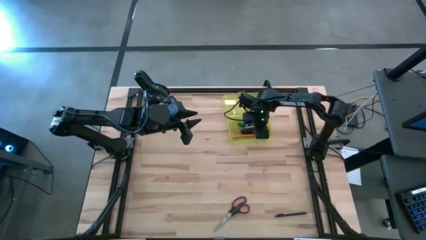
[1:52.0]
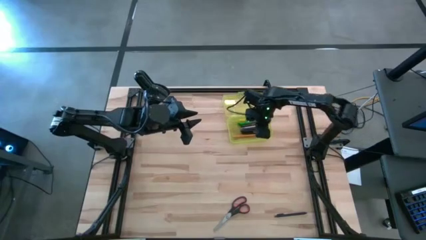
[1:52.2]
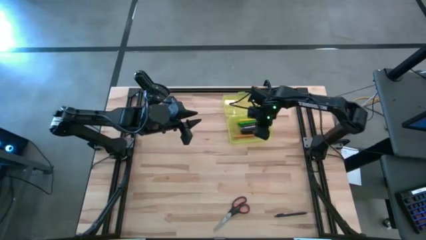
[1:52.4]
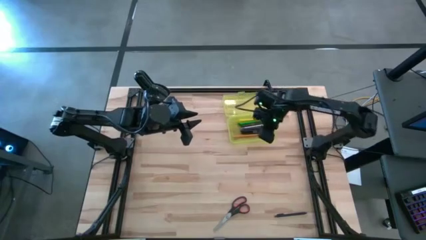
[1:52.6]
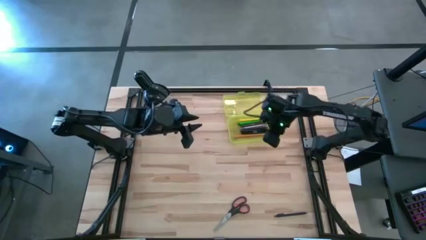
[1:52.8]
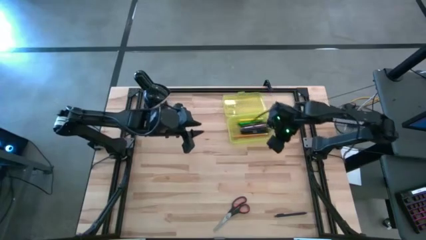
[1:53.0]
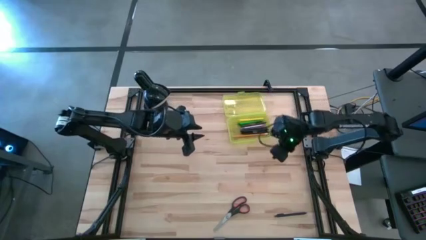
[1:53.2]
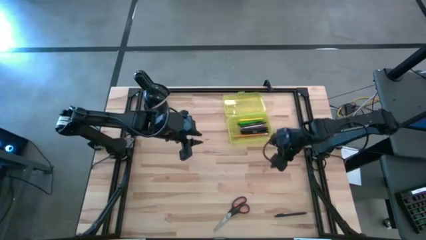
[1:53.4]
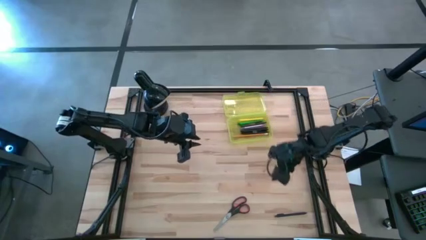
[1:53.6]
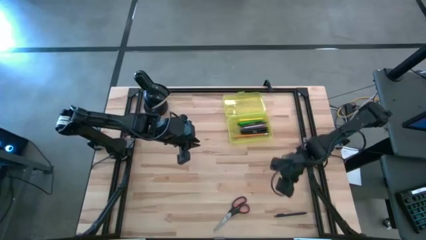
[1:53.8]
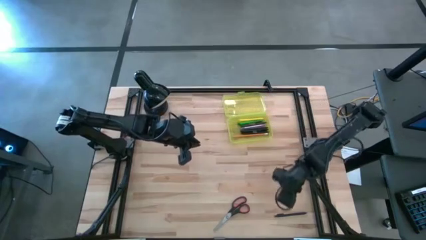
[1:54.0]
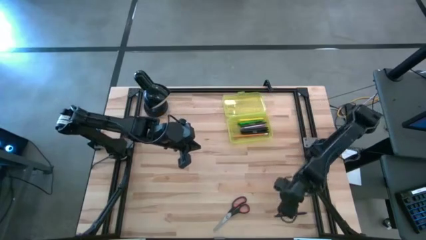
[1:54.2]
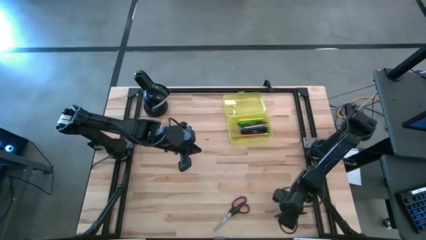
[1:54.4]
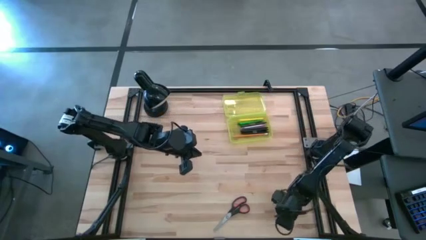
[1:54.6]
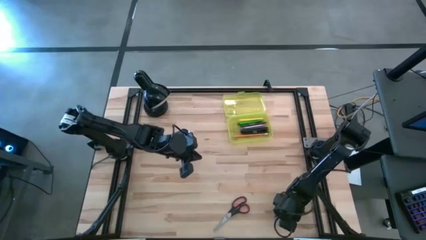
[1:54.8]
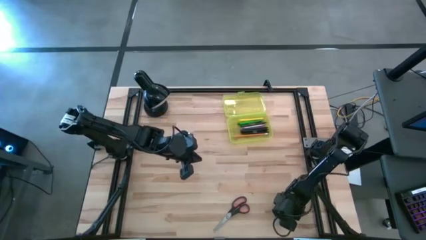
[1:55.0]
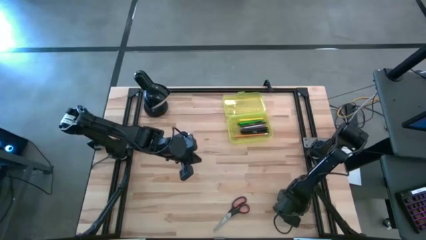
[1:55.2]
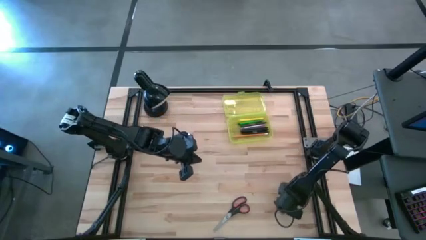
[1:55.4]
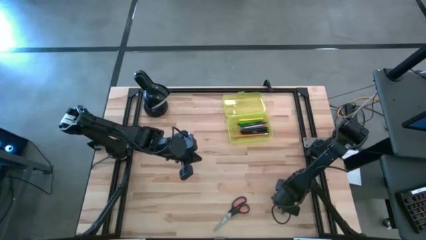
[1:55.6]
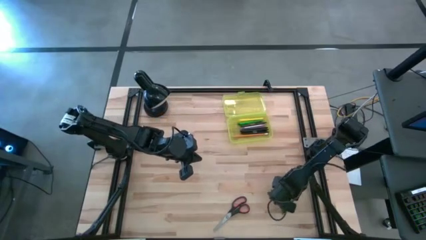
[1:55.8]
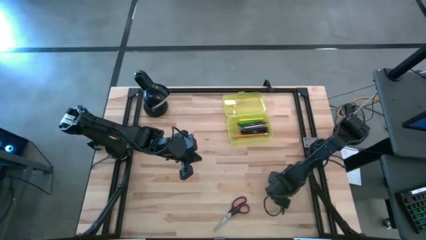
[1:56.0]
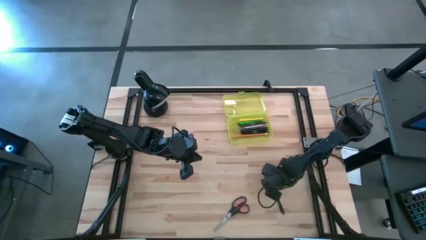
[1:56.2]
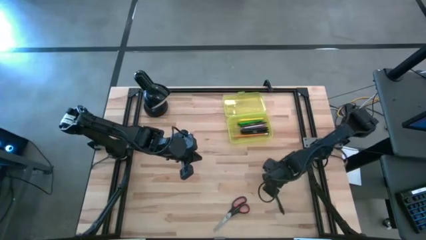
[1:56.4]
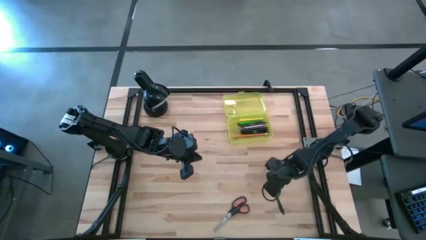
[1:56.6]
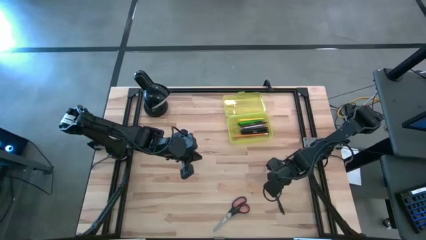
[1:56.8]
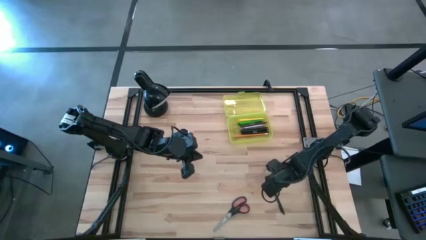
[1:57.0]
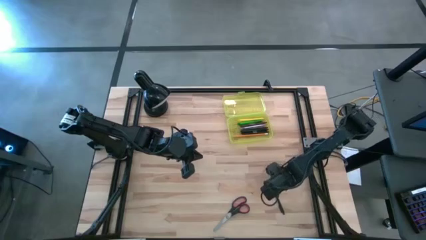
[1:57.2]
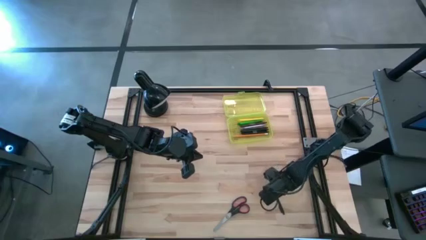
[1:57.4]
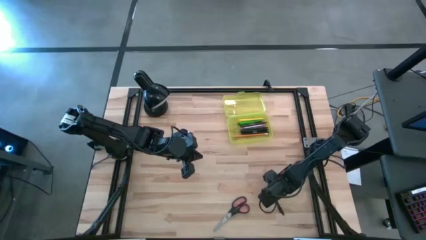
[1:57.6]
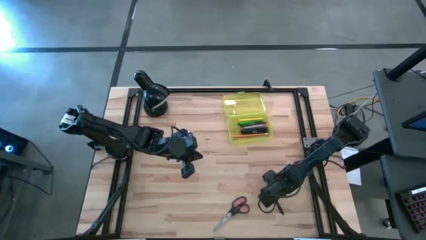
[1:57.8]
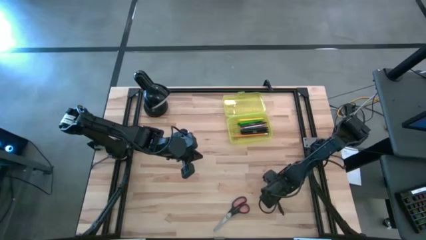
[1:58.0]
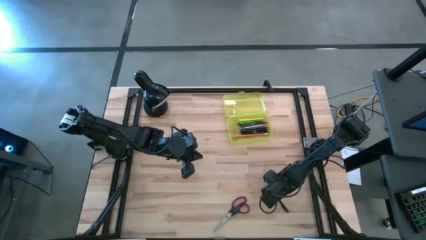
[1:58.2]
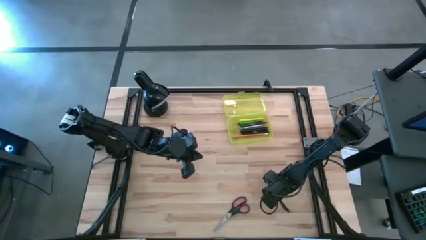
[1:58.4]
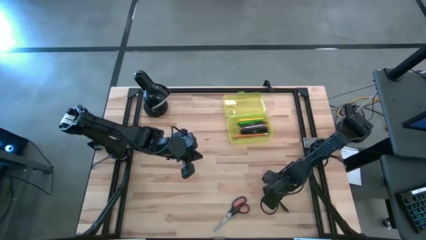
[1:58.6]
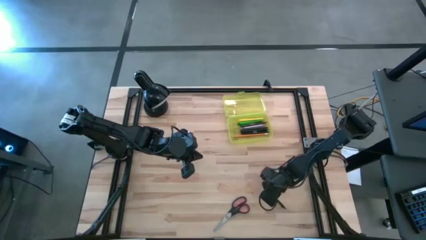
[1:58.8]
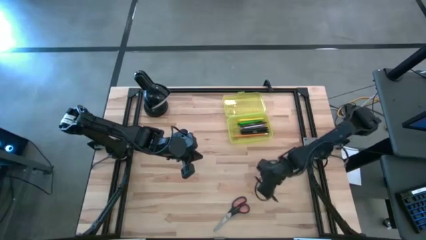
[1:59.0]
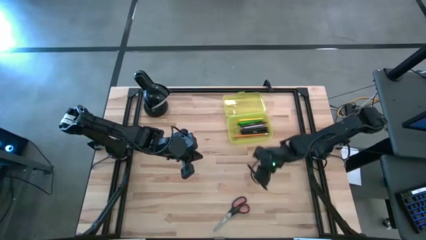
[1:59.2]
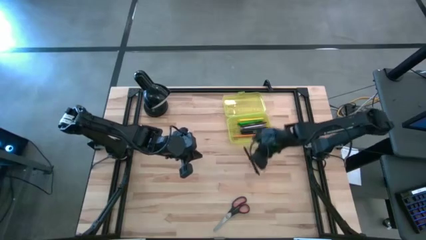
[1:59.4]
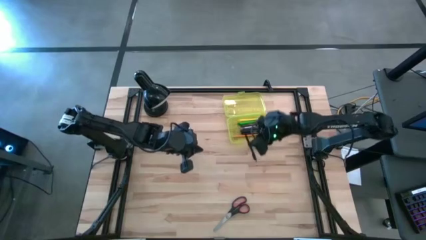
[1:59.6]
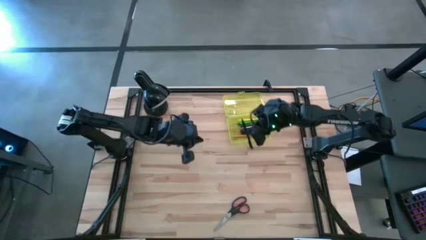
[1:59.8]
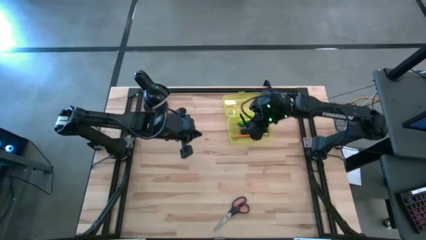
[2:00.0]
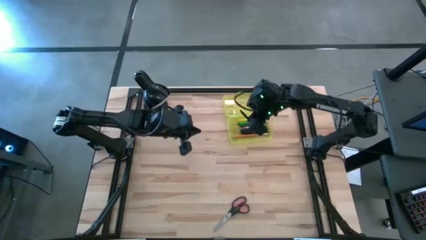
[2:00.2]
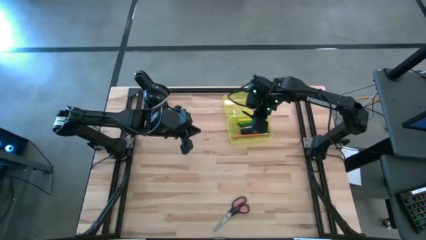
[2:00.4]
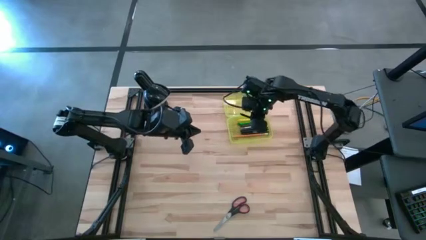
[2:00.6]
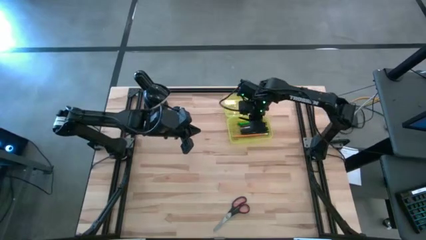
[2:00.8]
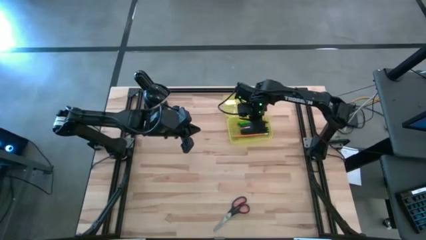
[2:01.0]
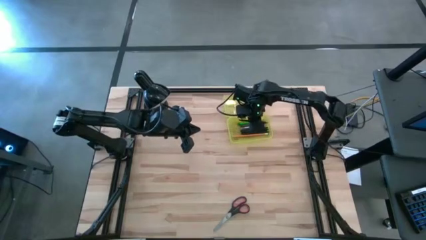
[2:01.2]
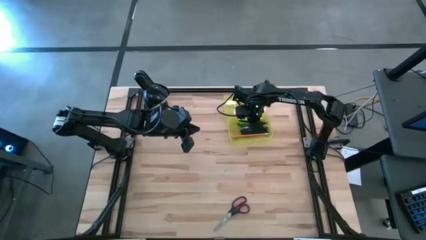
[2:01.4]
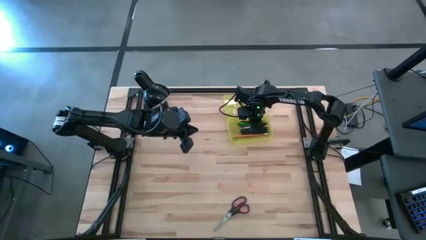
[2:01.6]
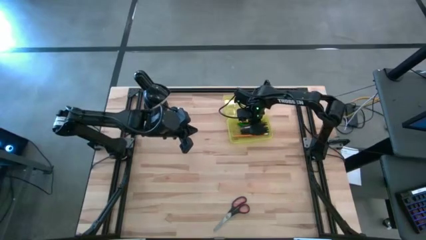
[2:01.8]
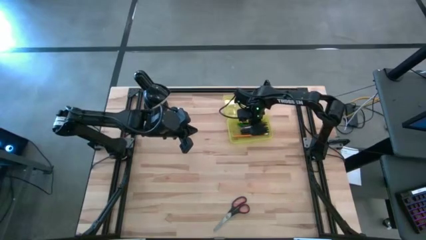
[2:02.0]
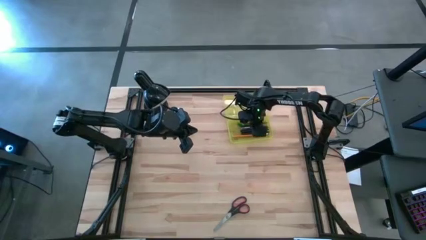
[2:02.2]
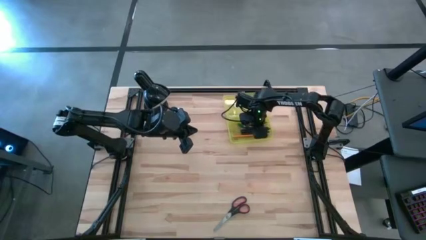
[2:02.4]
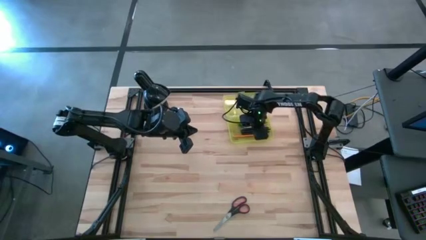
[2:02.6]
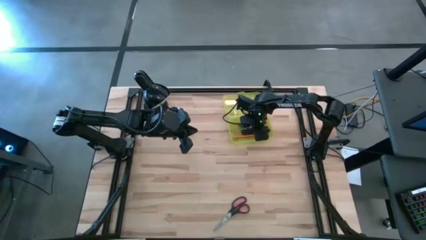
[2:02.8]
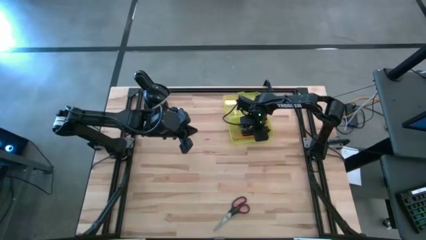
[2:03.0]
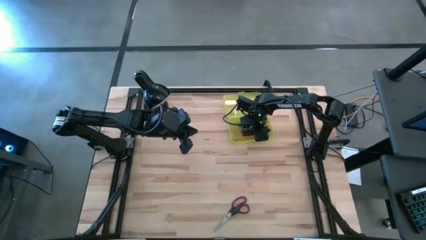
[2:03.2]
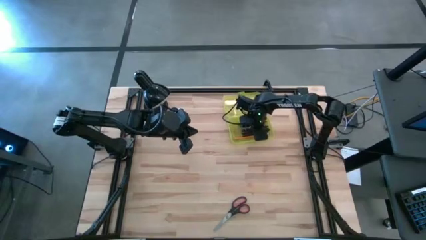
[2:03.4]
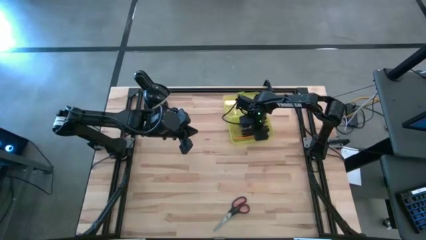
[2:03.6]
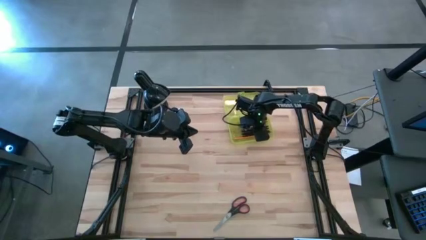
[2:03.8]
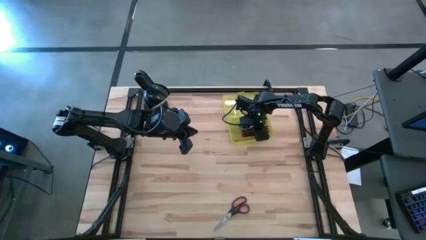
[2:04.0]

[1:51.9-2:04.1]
Task: Pick & place school supplies into a supply box
Put the black pen into the supply box

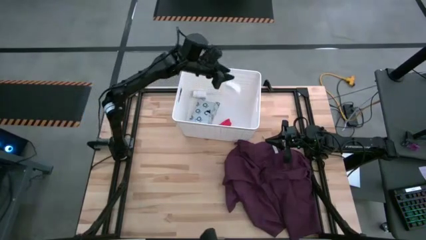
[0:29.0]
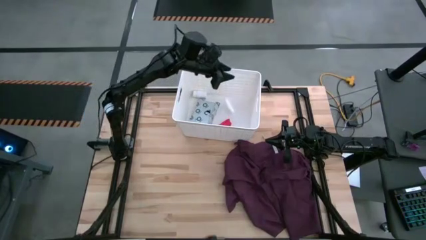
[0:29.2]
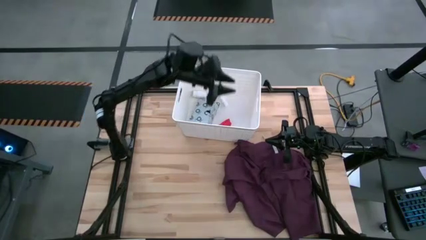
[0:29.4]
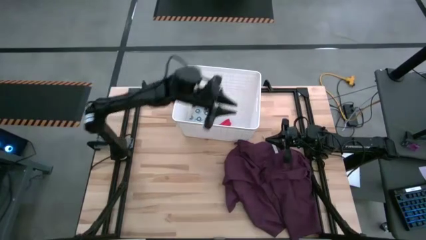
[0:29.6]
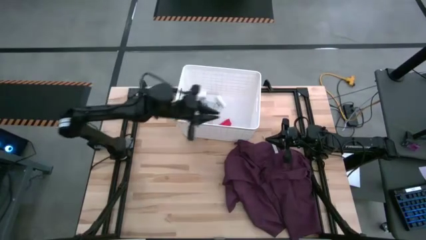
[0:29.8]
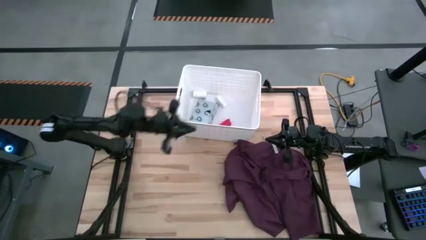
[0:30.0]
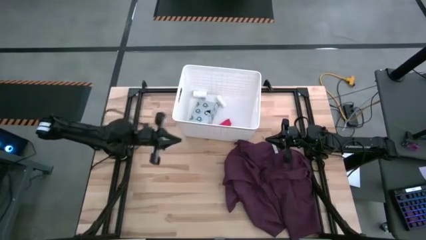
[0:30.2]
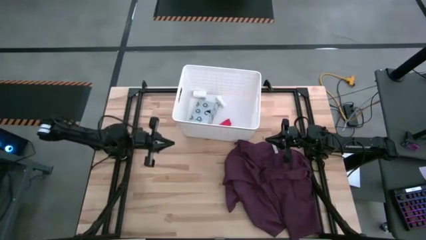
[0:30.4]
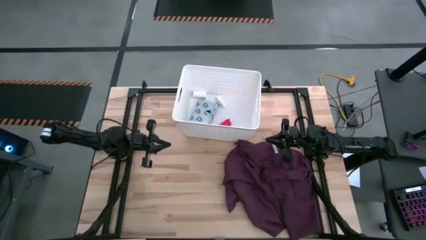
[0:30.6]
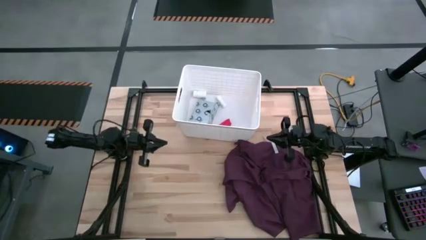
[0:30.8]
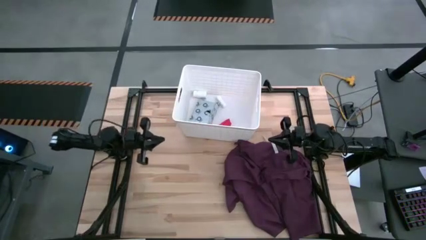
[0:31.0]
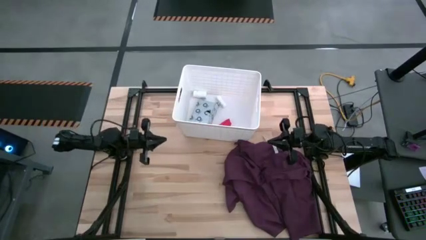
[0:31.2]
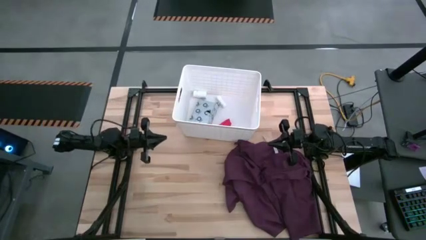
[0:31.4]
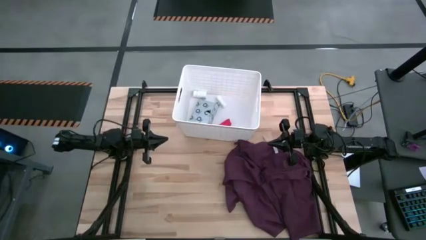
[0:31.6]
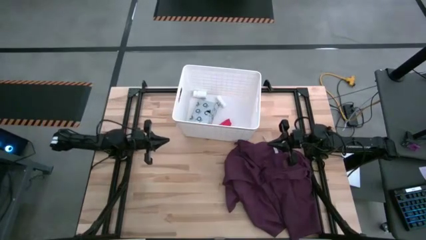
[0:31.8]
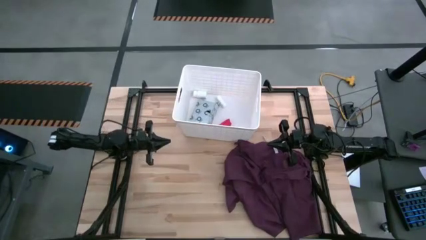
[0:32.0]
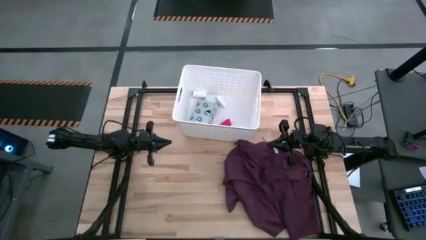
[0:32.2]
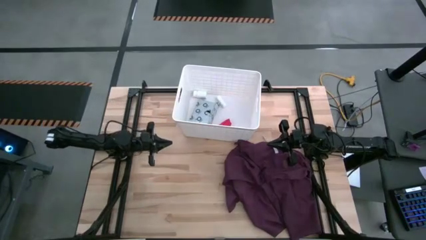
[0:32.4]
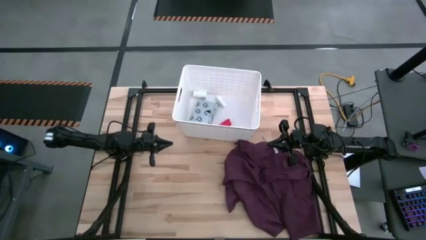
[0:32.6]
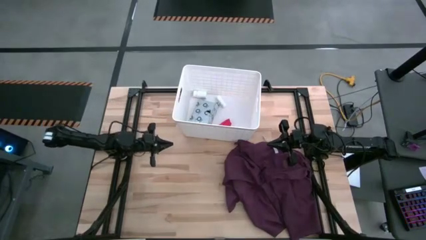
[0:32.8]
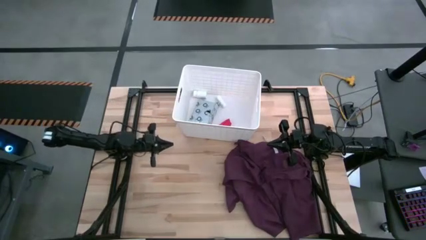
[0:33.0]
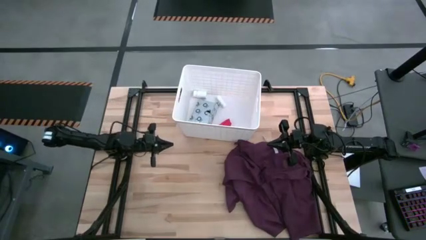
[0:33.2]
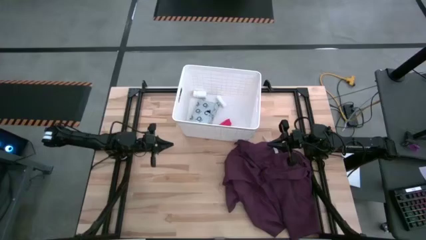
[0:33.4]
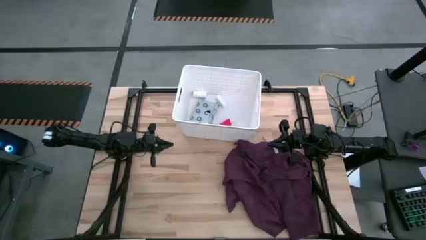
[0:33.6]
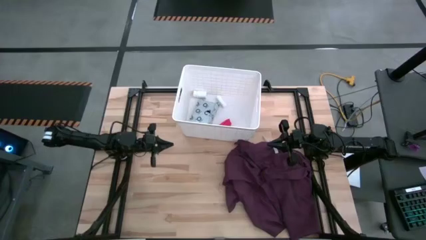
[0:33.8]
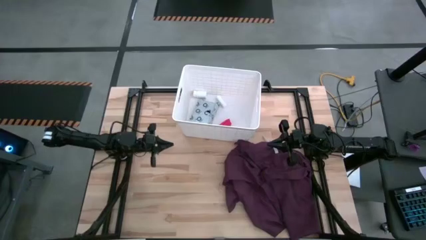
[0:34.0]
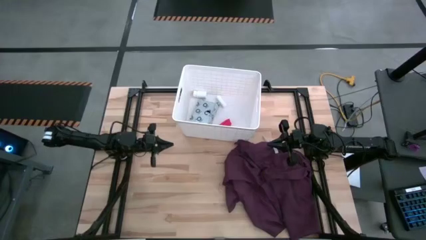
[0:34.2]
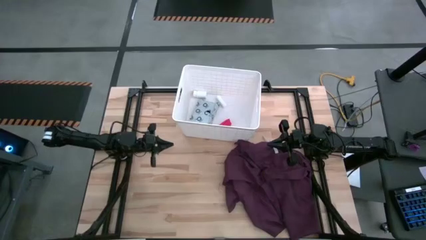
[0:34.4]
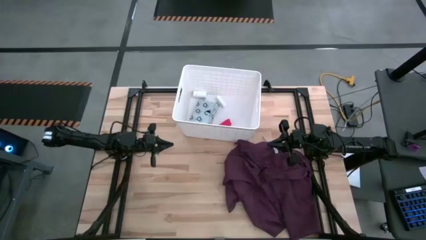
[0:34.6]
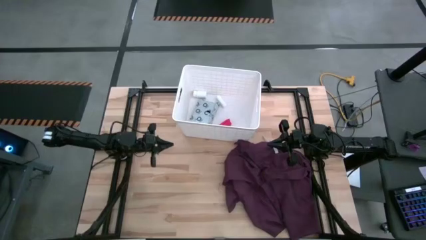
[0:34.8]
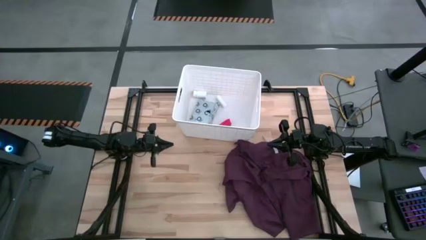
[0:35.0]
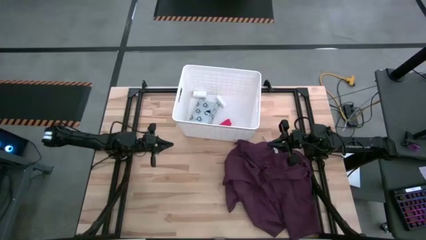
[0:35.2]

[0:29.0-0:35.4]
Task: Pick & place medical supplies in basket/bin
Return to Home Position
